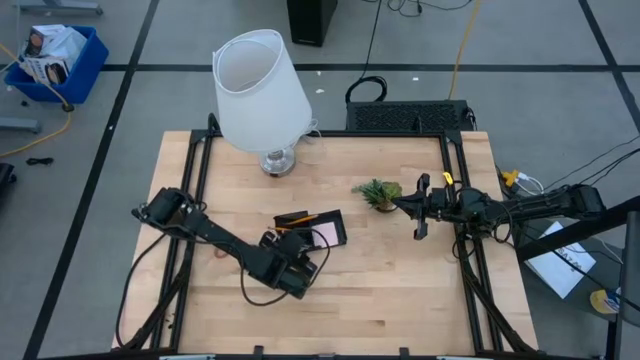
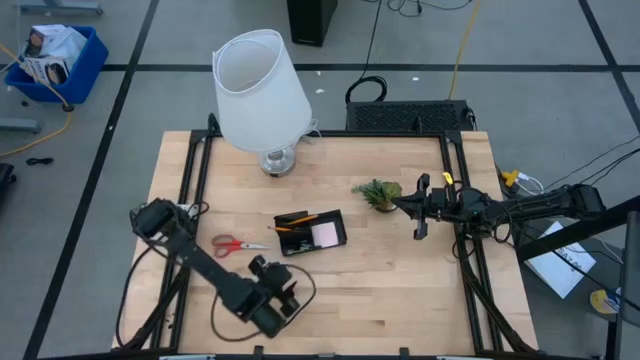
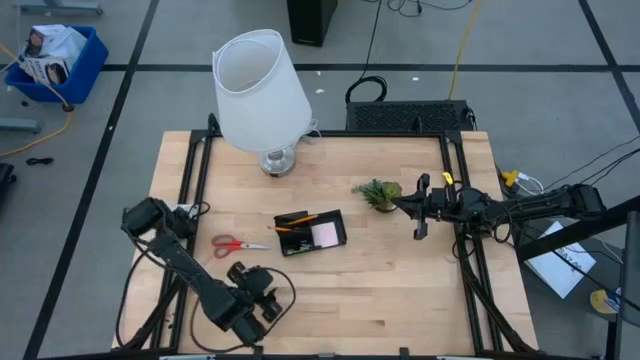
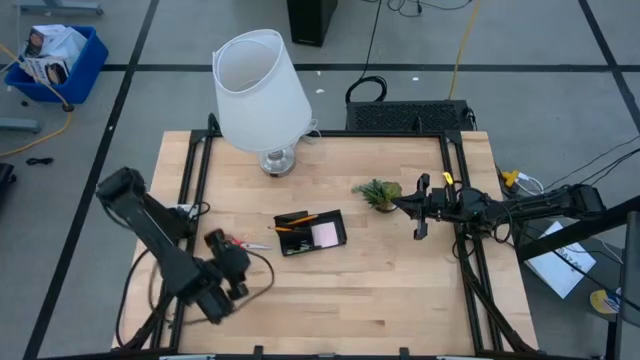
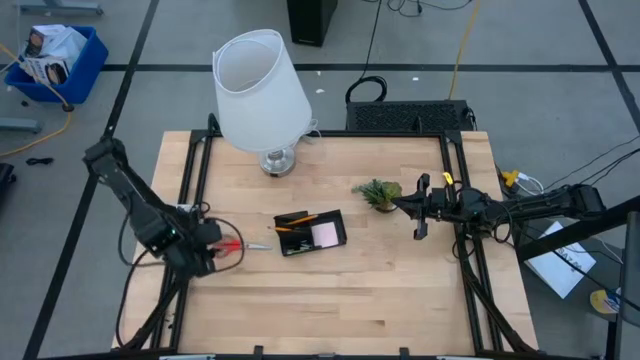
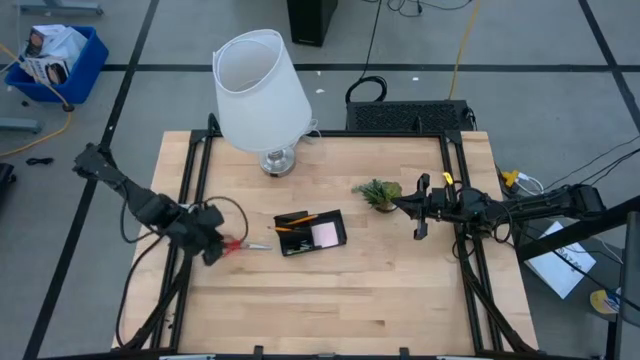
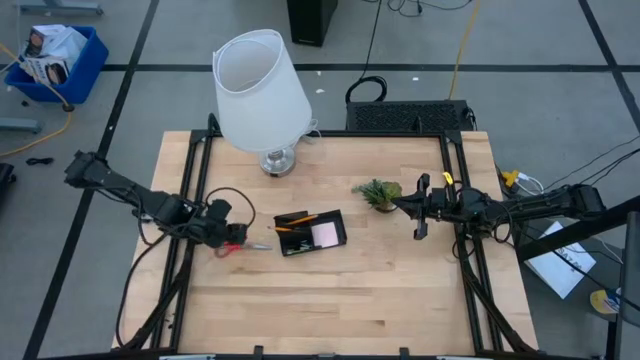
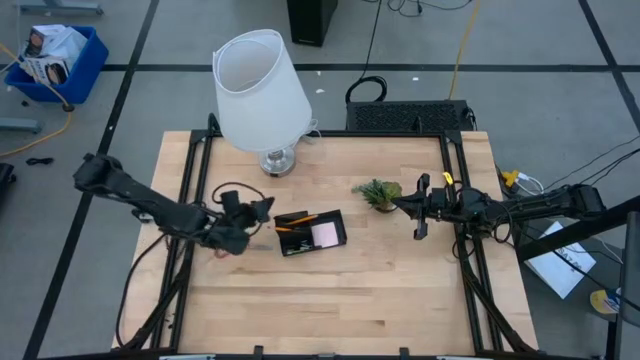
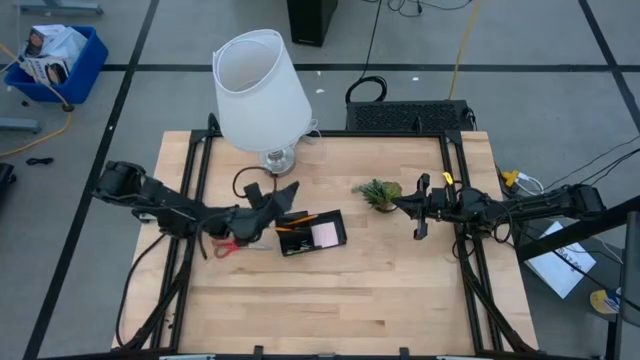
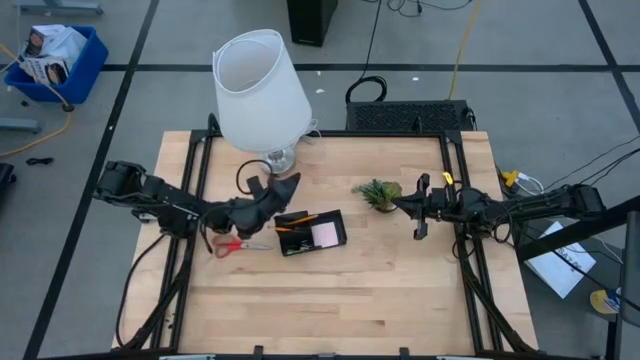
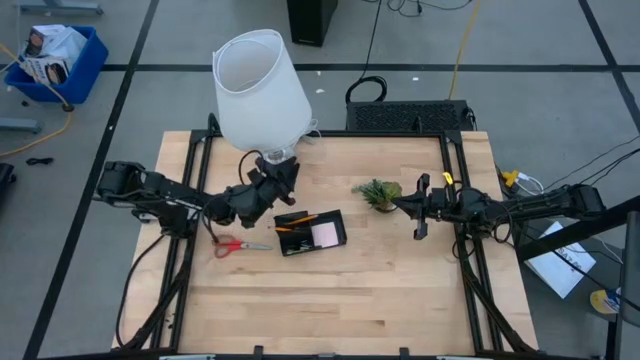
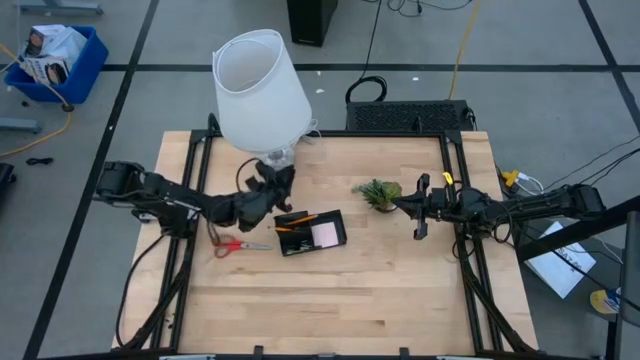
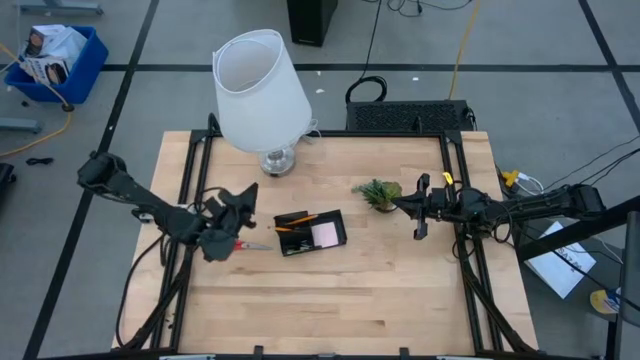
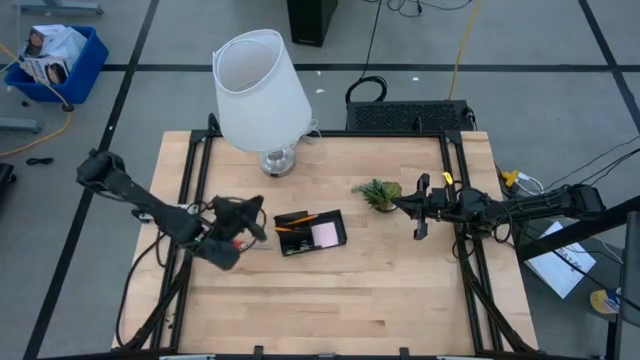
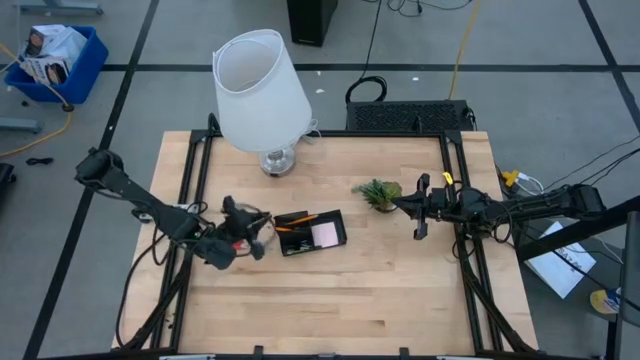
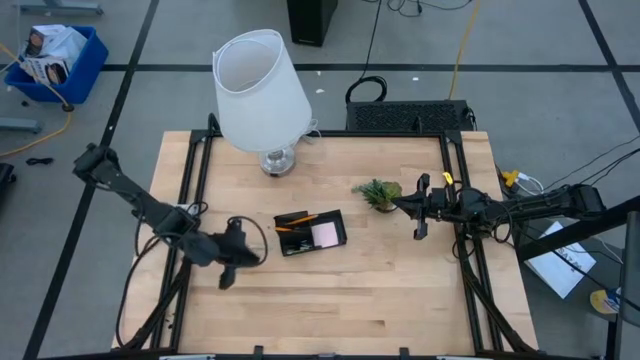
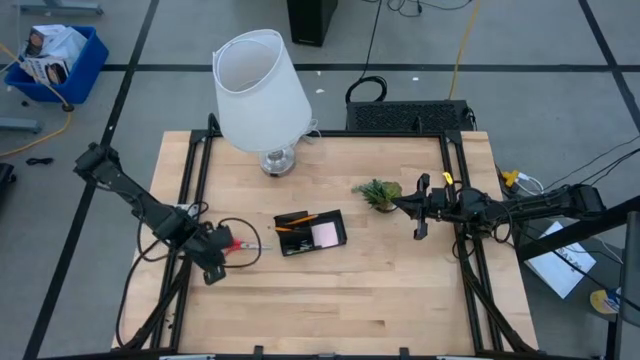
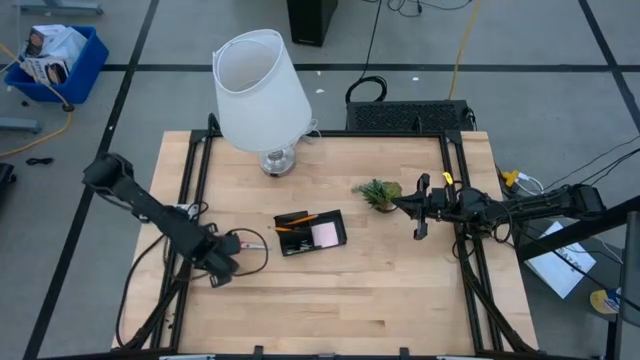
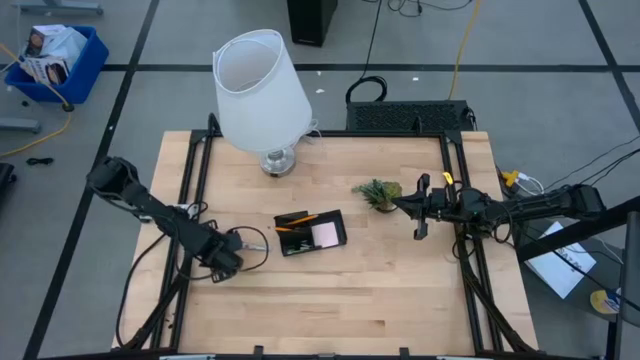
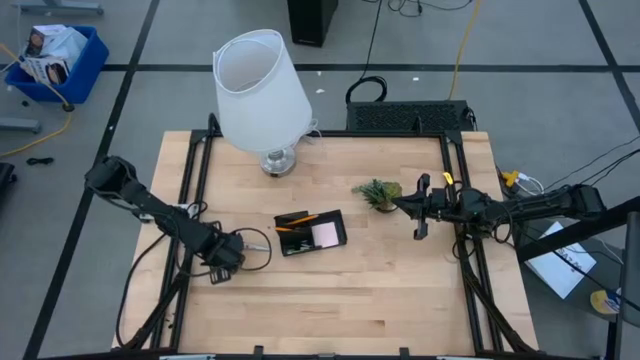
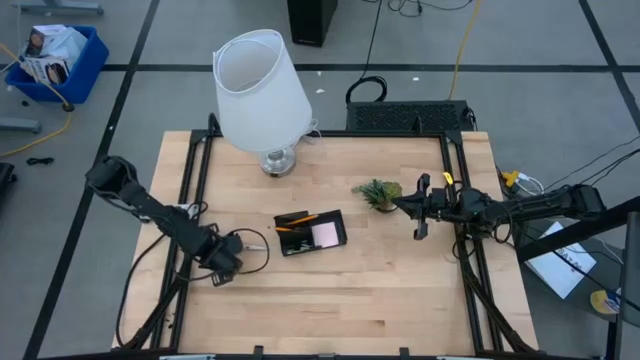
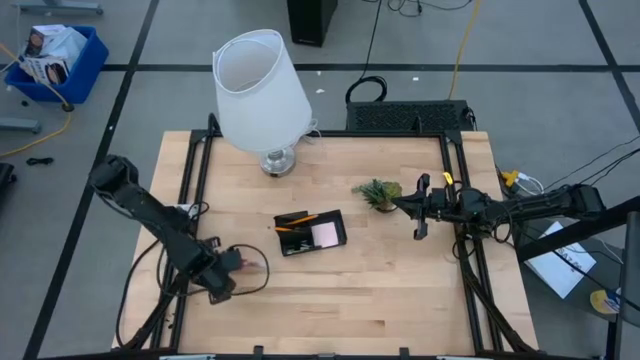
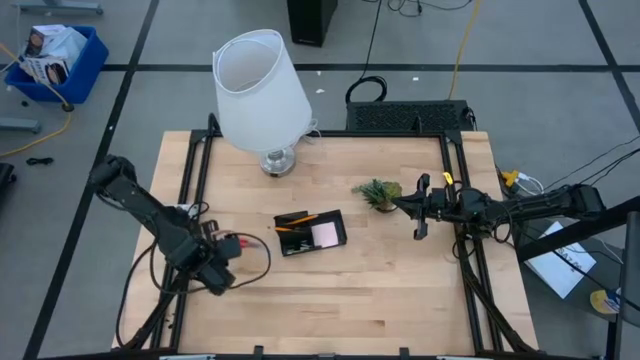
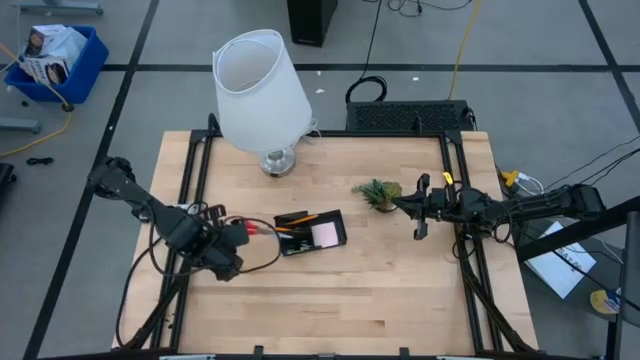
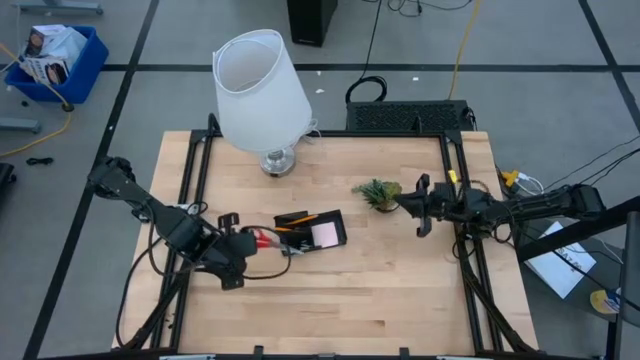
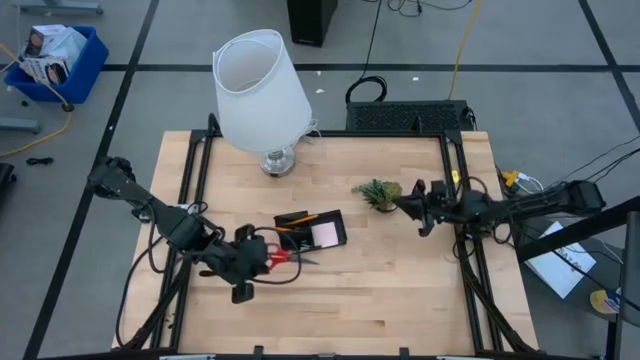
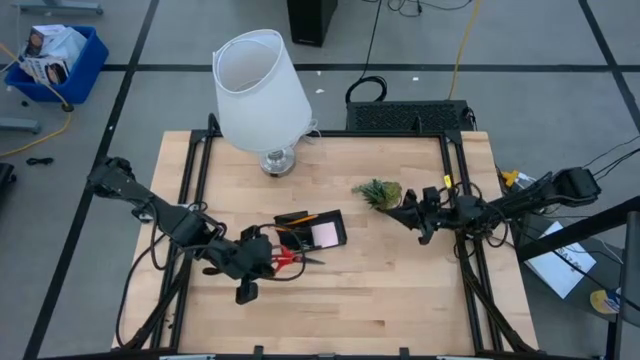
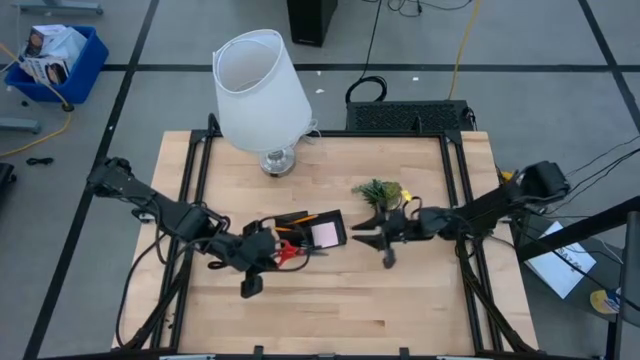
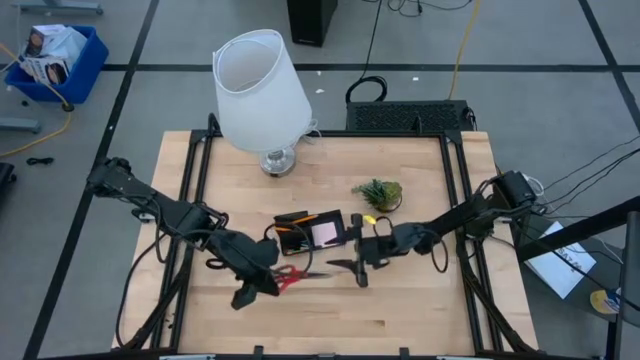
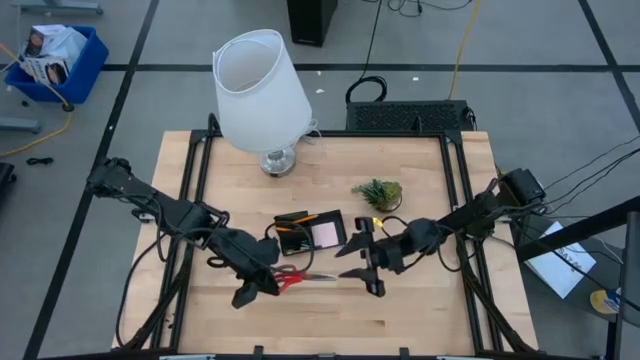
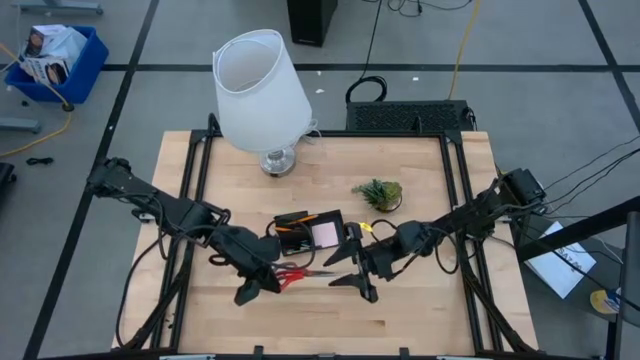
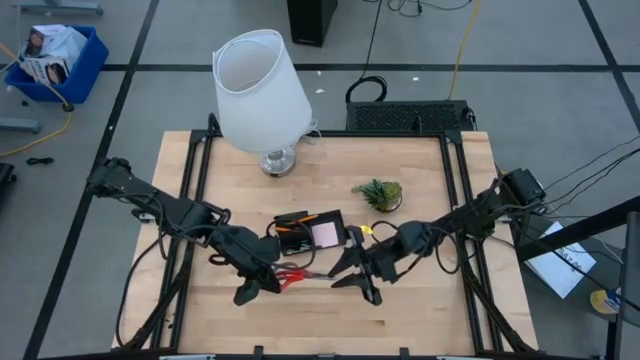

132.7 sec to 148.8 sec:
Task: Pick and place office supplies into organizer
Put the orange scissor into the black desk organizer

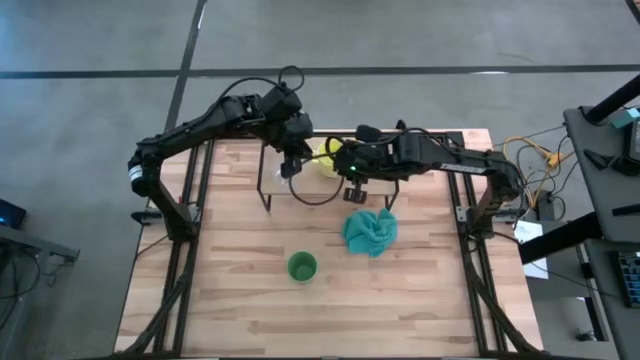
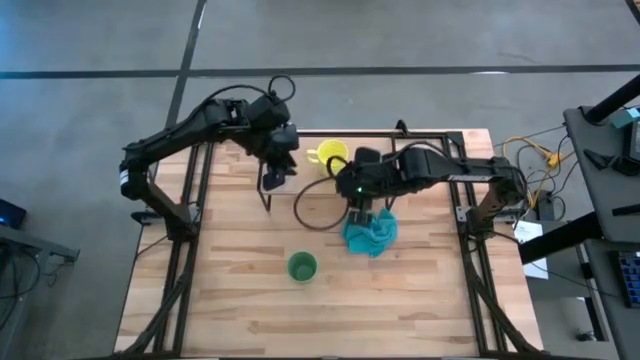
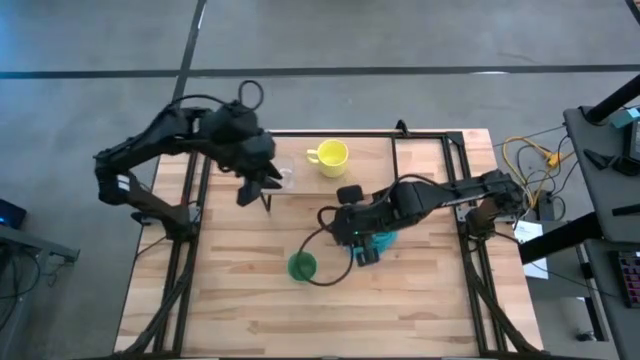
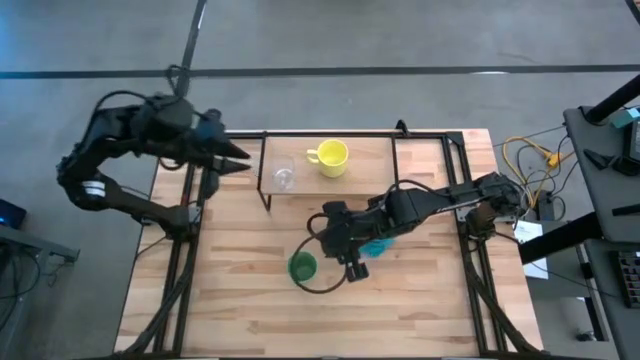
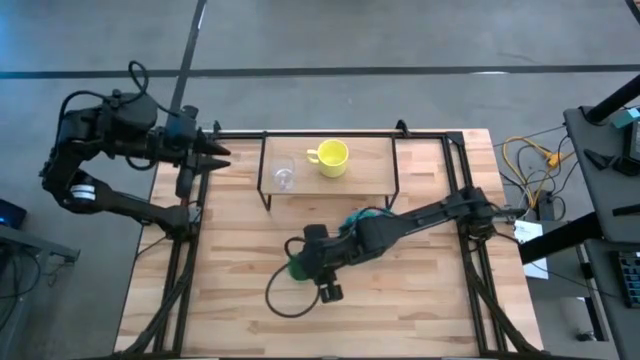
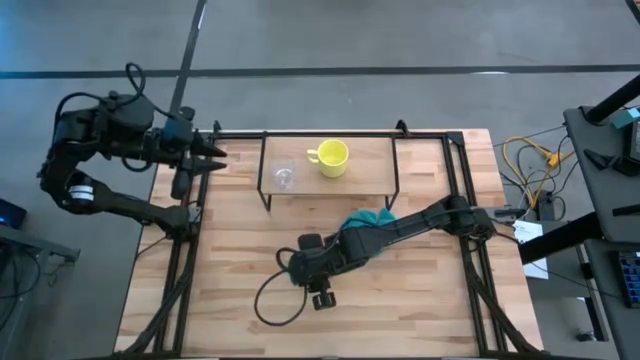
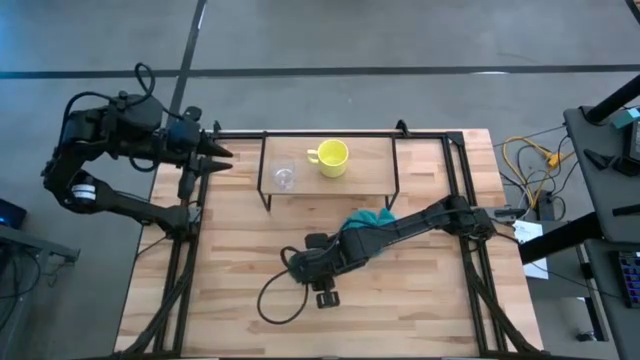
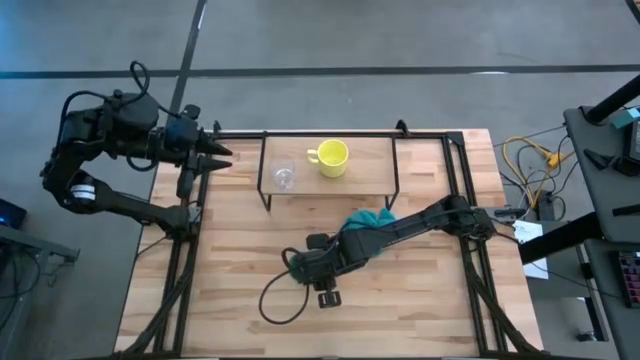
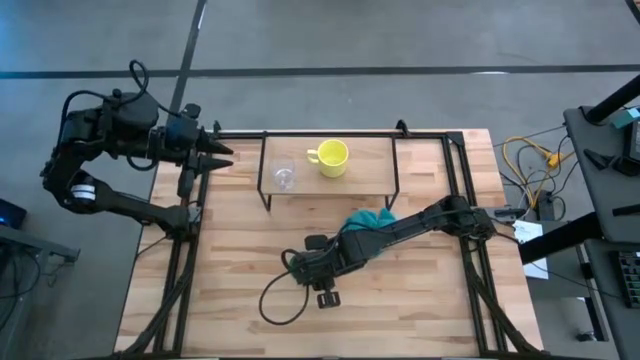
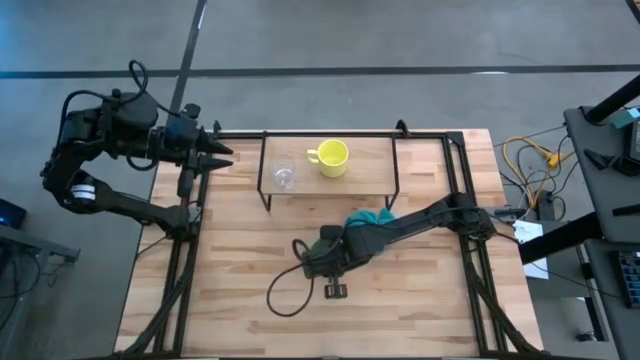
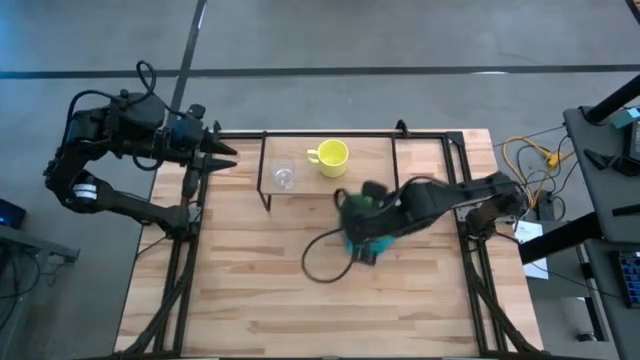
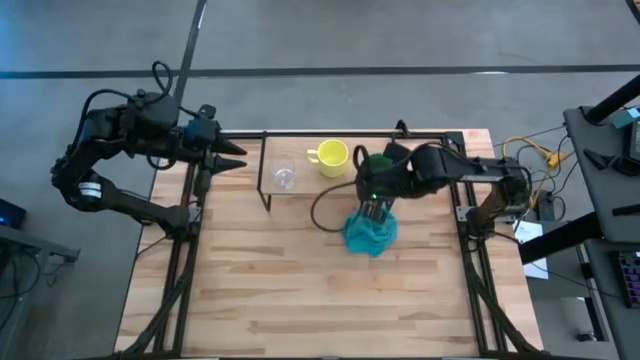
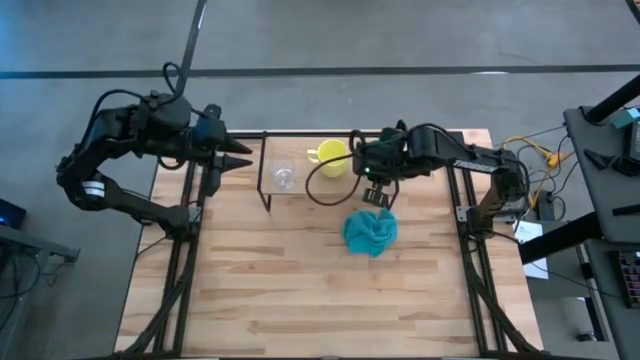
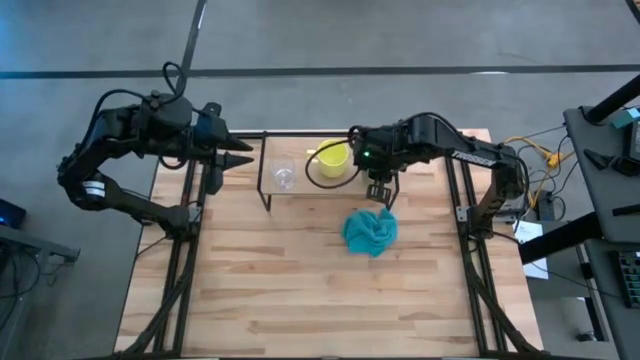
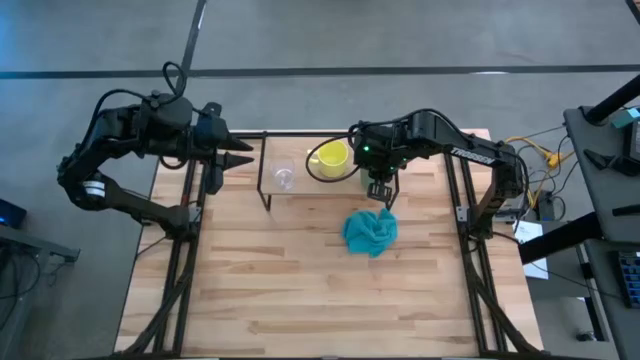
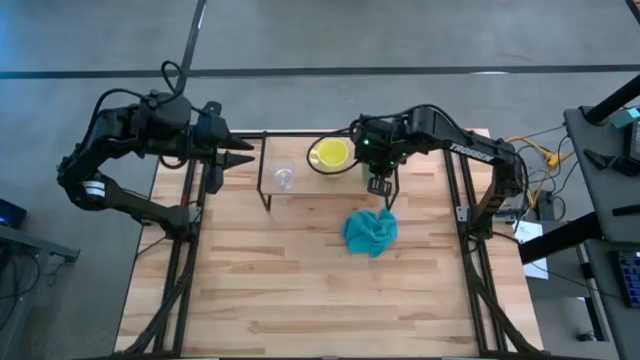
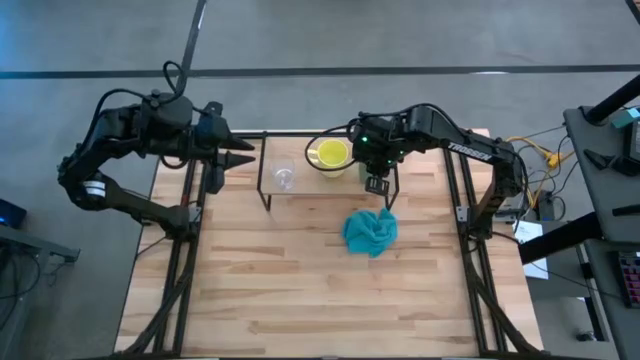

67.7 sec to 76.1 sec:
Task: Stack small to large cups/mugs on shelf
Put the green cup on the shelf
